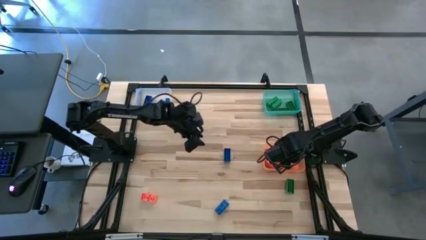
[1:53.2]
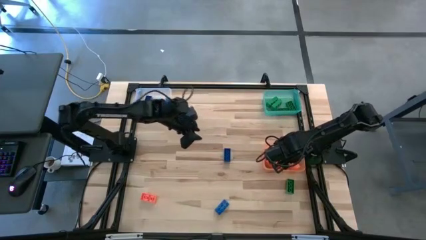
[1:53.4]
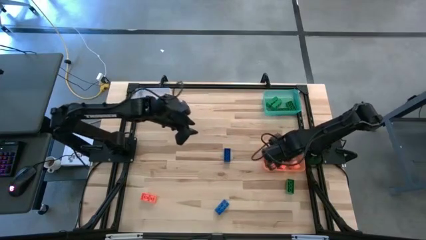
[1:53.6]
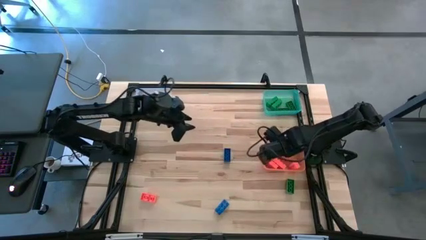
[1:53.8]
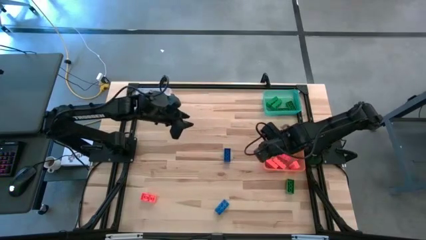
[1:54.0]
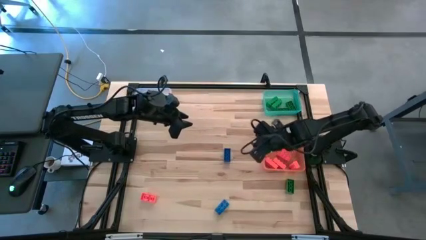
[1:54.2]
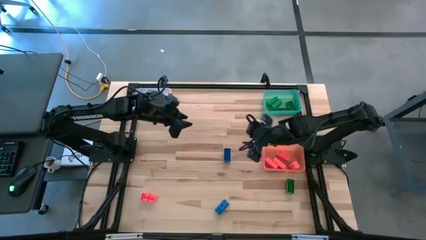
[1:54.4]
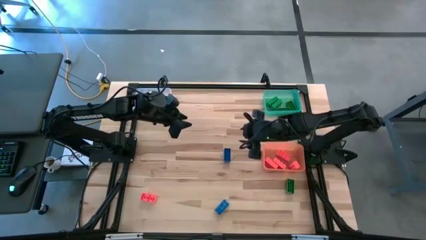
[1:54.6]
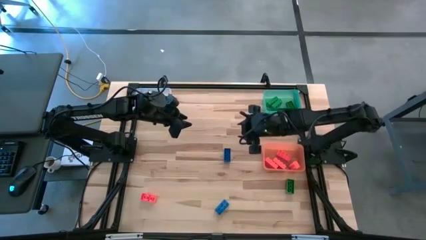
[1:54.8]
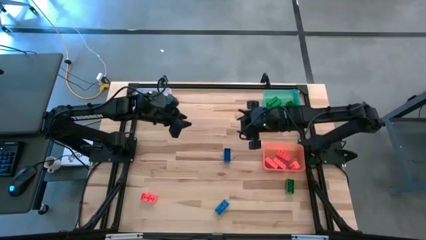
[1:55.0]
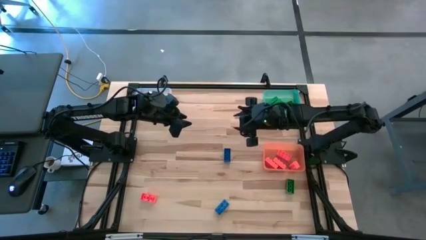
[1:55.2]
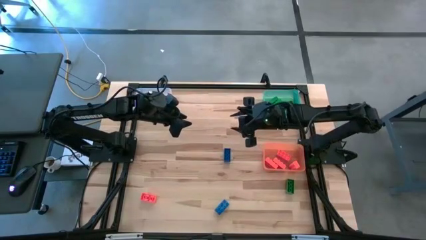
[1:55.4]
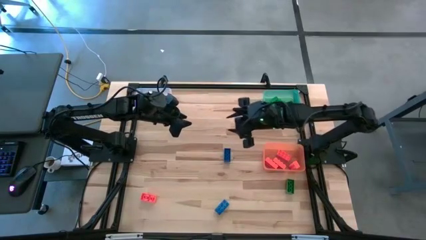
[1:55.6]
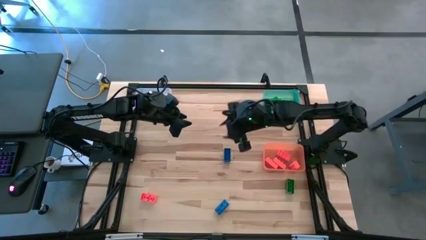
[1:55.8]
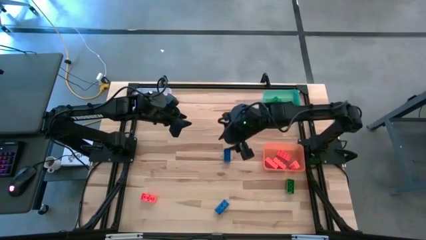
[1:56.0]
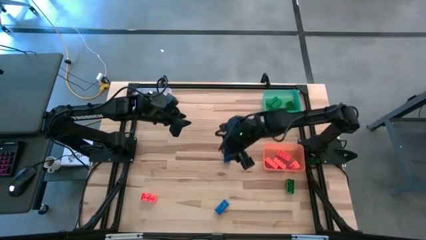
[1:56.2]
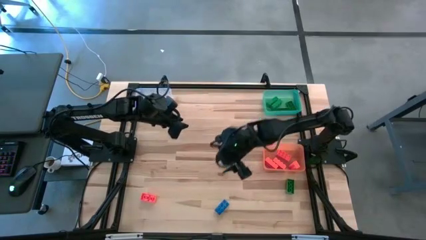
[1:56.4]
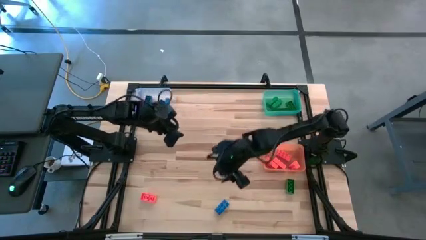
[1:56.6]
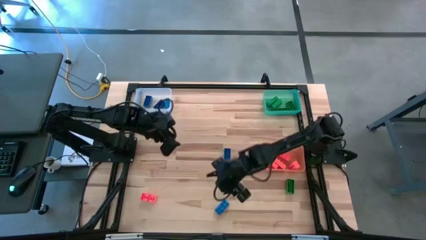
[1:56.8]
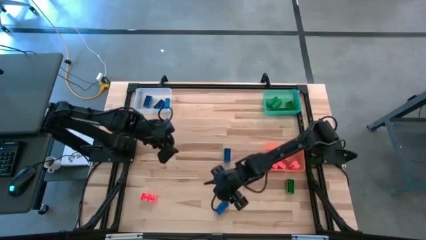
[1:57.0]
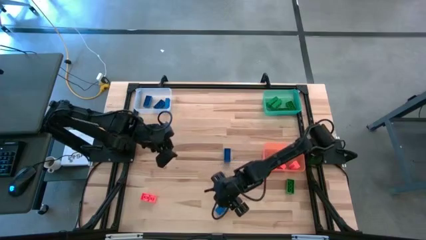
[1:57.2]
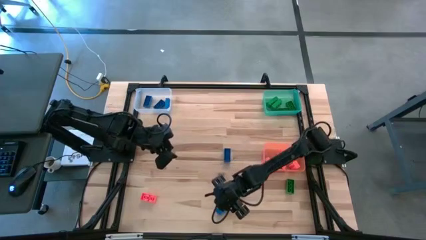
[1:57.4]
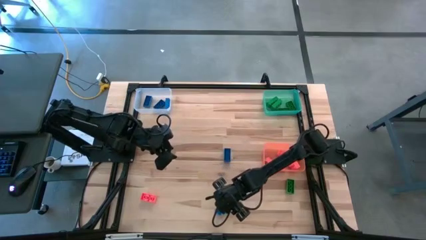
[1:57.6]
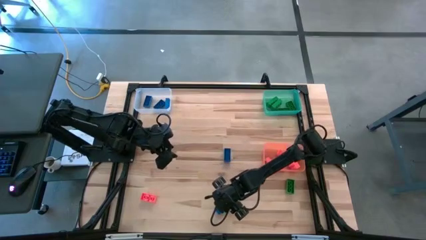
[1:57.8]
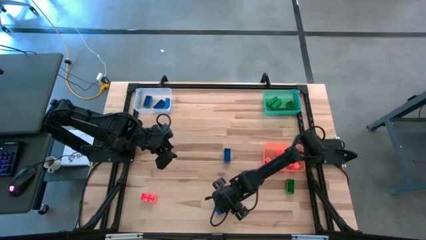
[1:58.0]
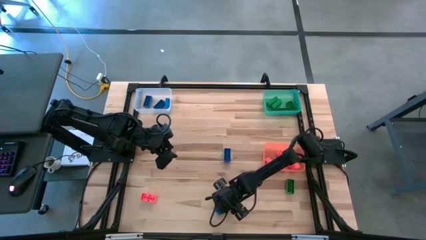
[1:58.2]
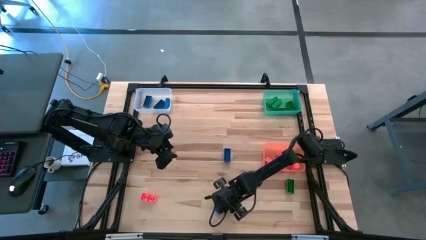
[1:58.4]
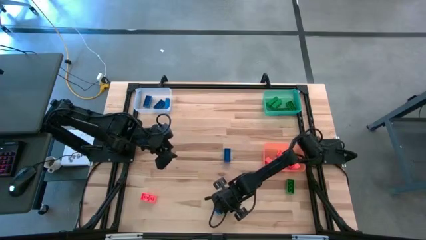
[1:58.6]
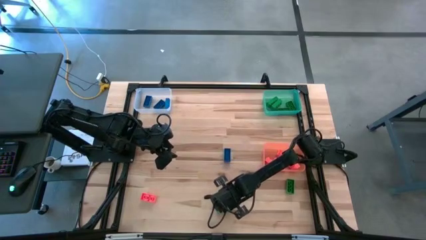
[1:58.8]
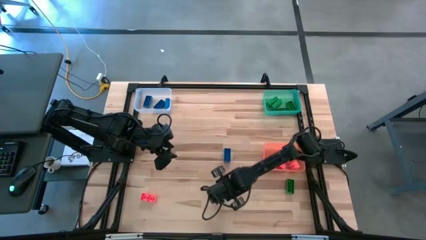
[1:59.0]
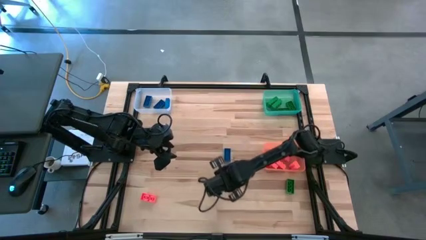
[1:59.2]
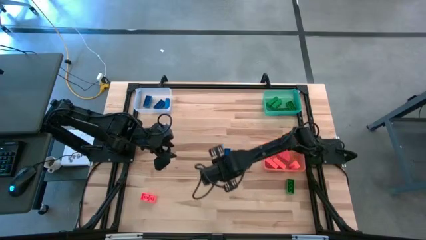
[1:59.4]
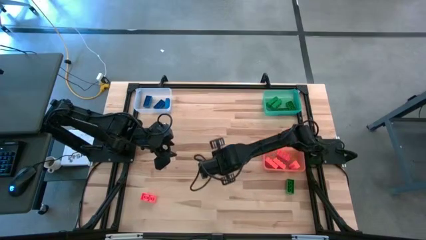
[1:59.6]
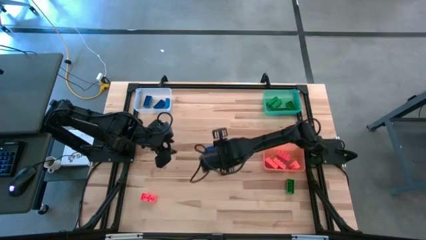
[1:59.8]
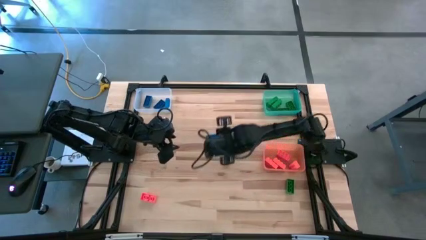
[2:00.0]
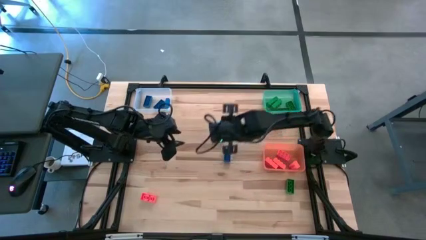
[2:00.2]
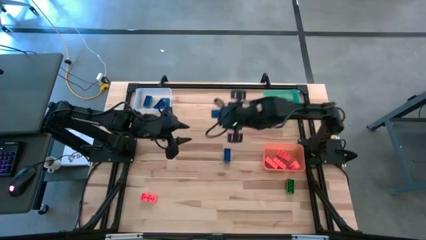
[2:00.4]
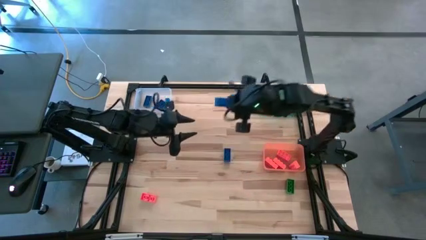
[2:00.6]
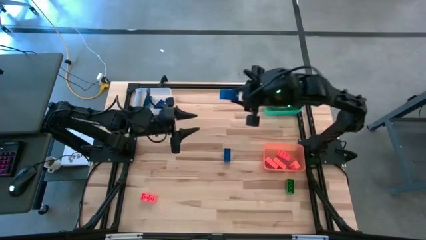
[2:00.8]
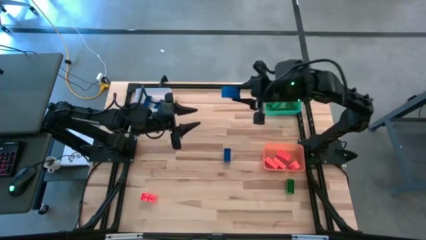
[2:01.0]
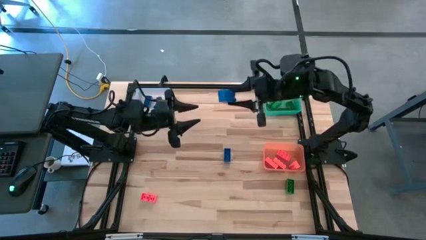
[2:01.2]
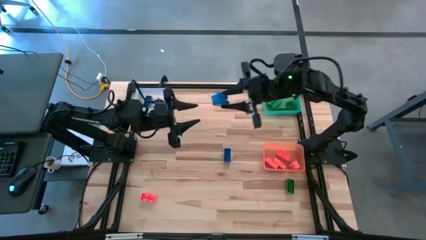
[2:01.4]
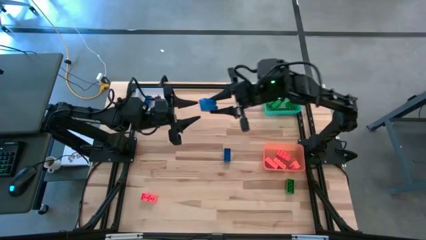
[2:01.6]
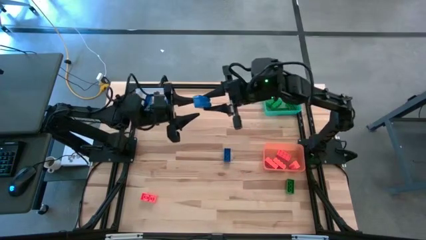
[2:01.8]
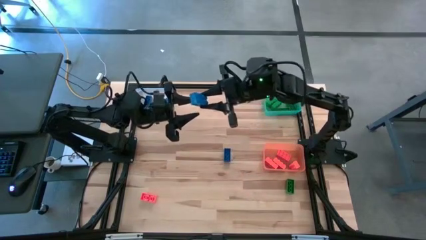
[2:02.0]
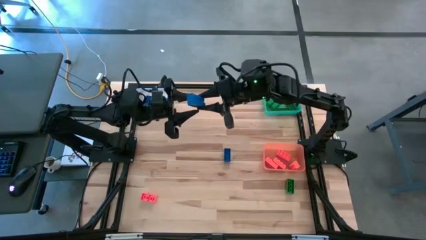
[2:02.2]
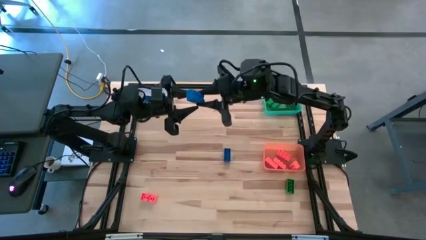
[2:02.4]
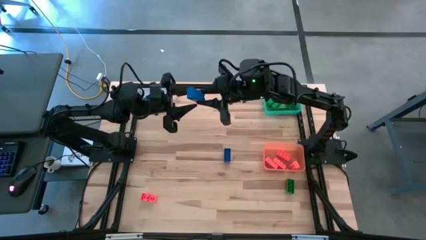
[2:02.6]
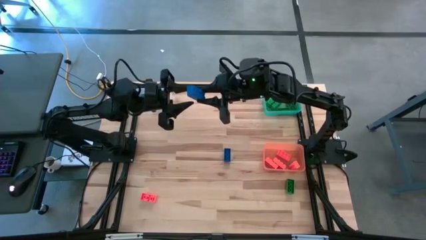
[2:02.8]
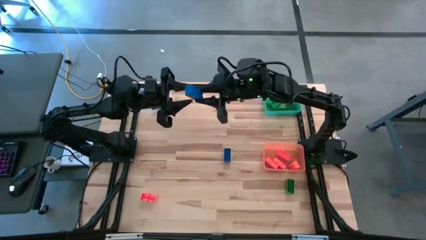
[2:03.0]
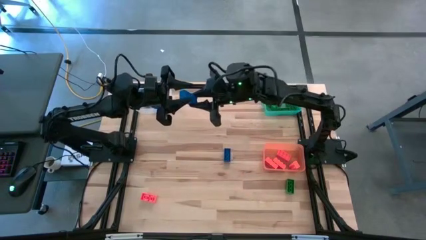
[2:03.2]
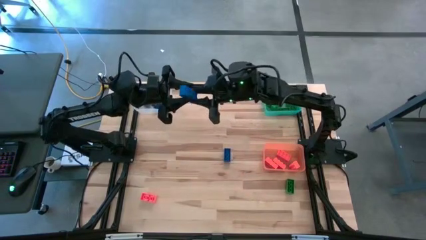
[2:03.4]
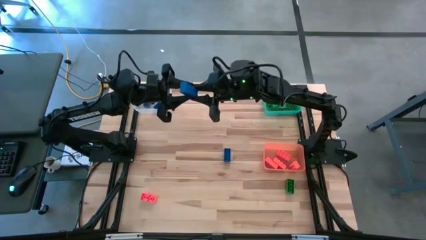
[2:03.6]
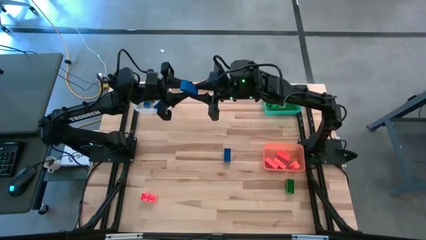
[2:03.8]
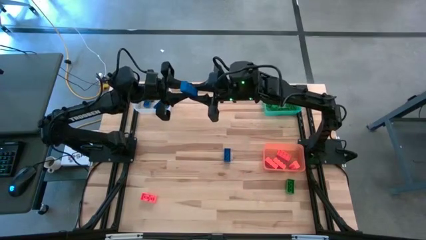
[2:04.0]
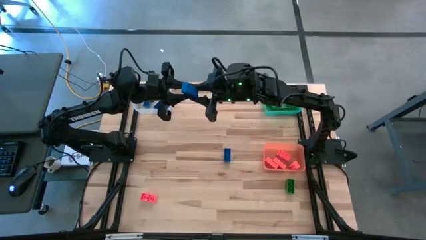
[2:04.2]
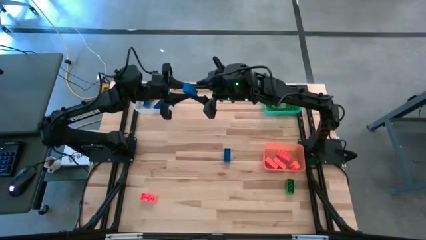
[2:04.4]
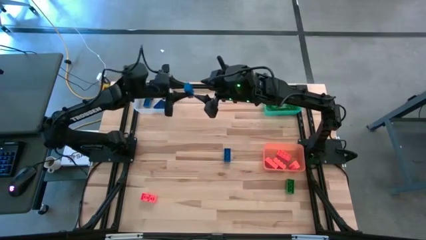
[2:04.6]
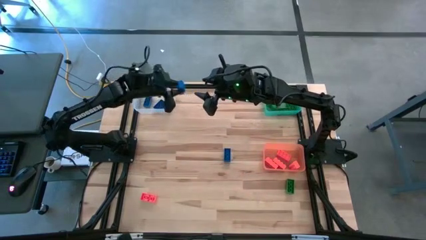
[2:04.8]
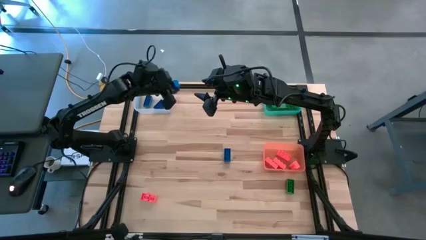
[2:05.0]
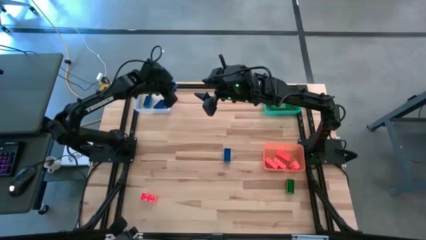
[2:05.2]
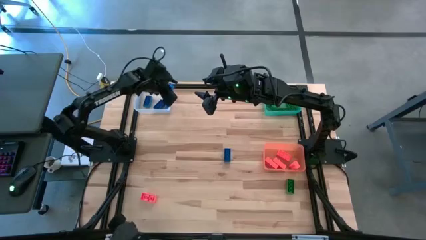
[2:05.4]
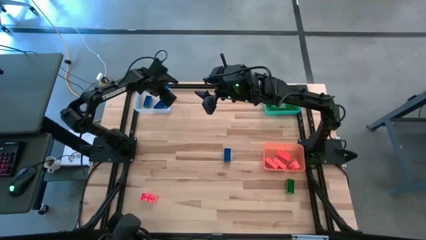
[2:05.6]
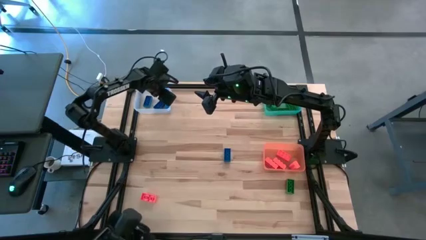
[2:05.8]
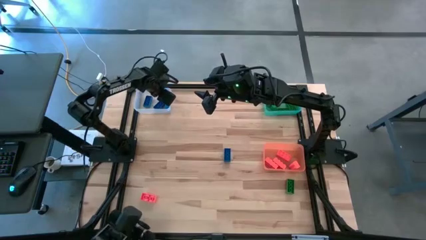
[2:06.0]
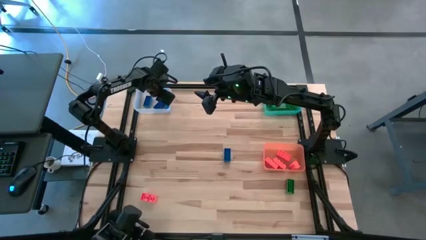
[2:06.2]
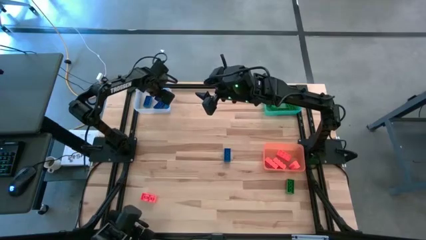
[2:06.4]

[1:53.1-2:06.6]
Task: Sort & place blocks by color
Put the blue game piece into the transparent bin

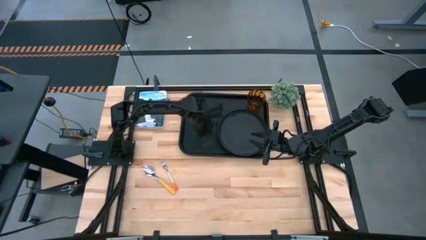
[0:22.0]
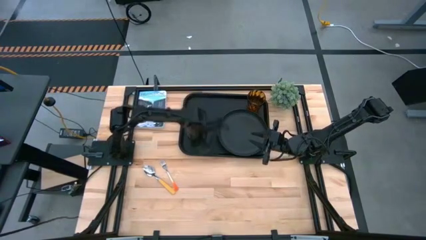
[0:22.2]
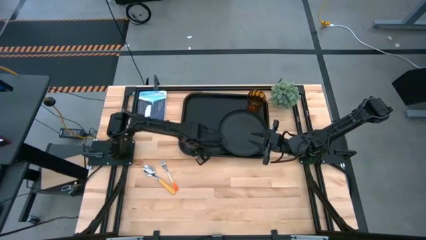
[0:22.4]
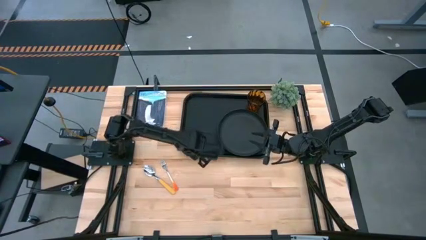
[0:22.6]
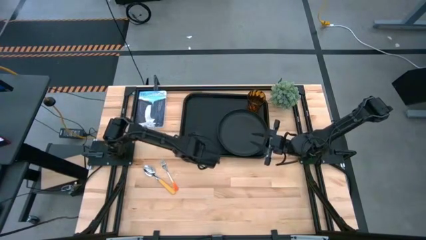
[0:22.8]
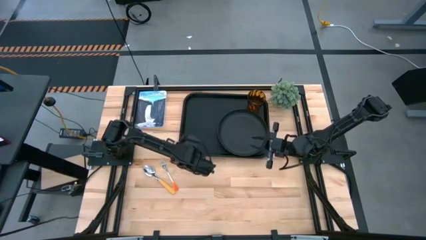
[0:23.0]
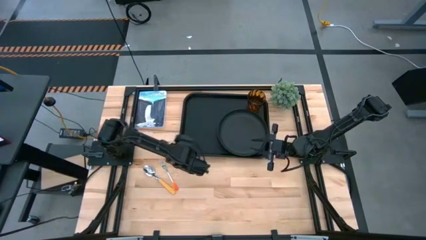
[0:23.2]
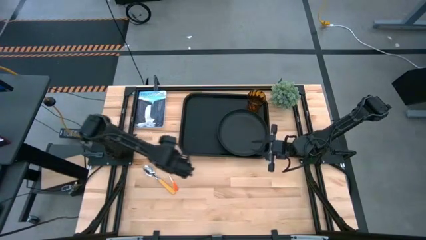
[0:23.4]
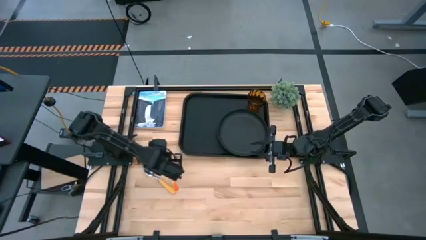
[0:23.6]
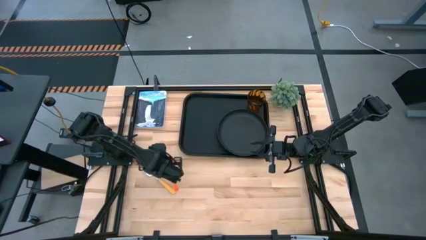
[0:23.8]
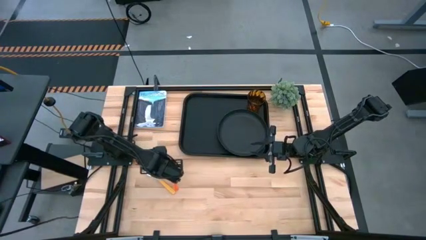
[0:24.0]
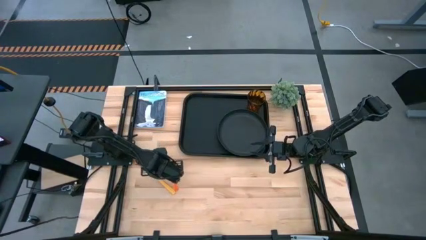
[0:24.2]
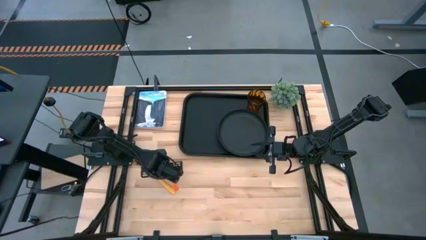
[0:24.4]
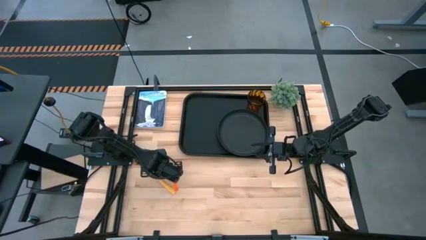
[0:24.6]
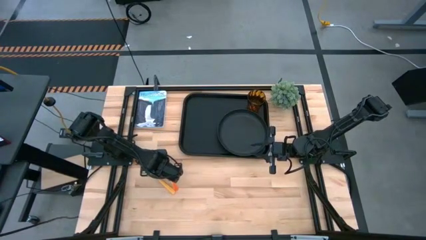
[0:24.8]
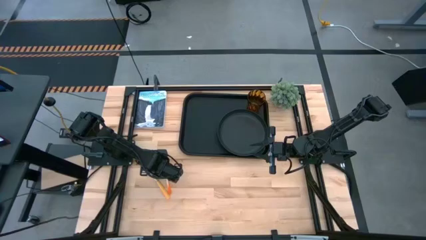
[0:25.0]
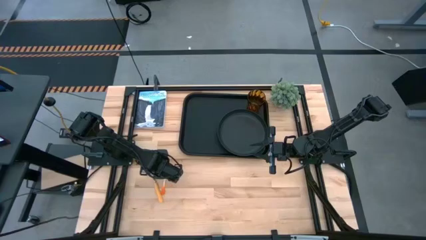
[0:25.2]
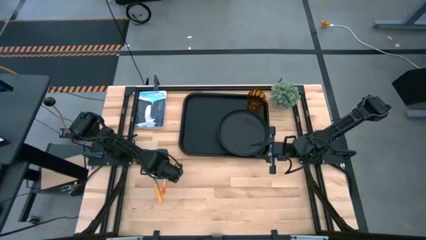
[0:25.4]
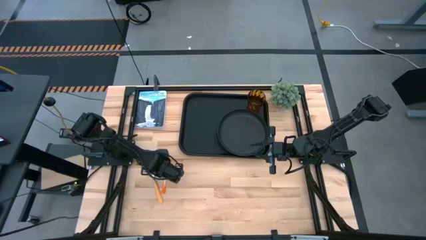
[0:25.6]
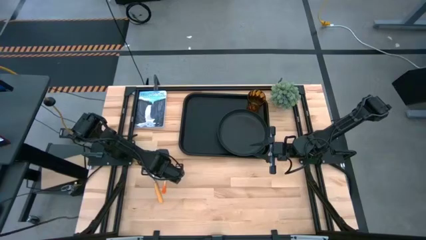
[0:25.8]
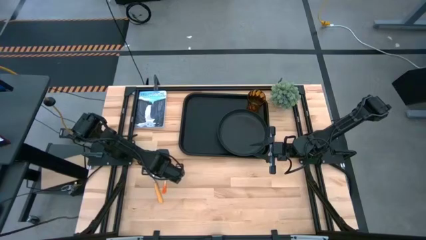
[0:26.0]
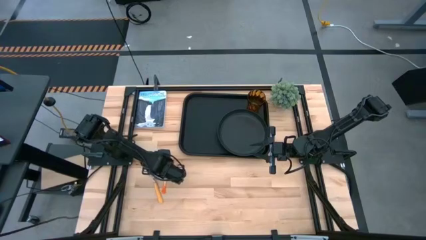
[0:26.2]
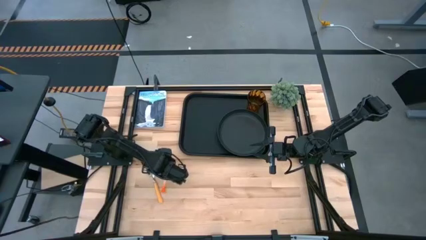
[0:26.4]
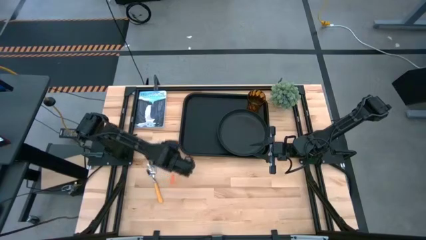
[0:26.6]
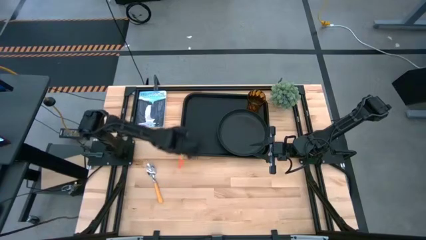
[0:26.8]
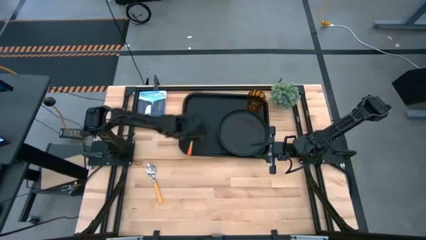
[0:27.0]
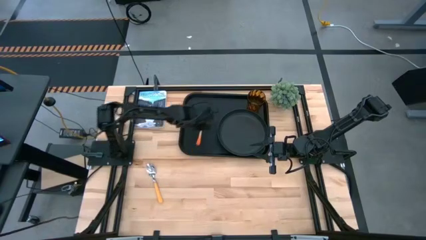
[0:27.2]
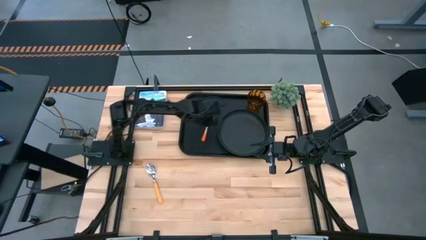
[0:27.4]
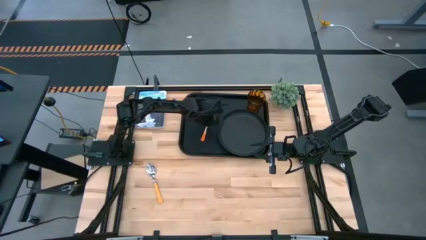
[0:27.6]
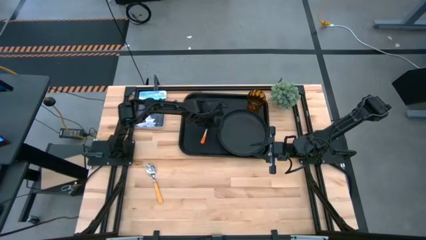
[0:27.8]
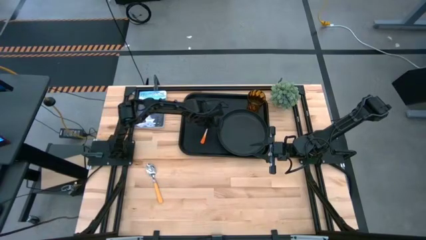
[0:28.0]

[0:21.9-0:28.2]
Task: Pick and place plate/cup/fork/spoon on tray
Put the orange fork on the black tray to the left of the black plate
